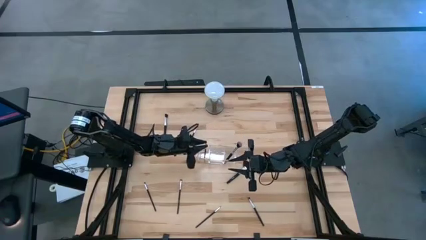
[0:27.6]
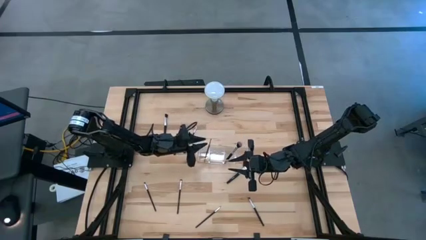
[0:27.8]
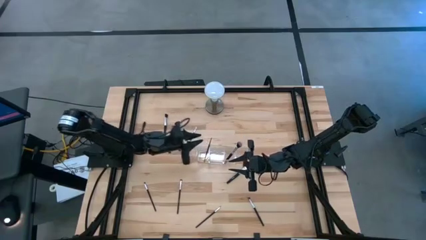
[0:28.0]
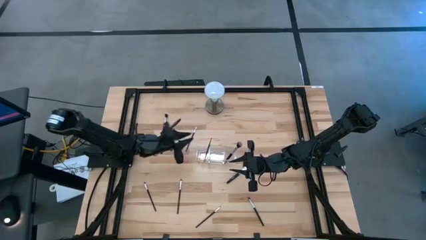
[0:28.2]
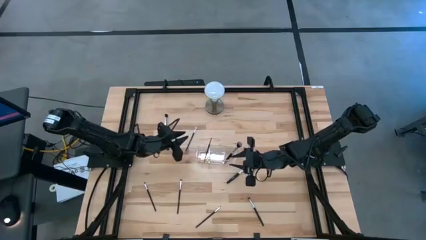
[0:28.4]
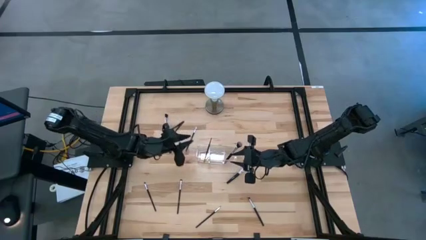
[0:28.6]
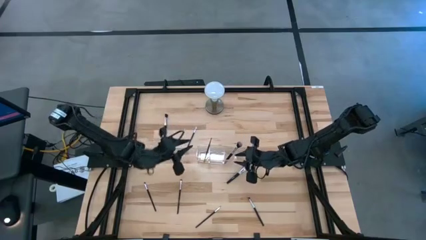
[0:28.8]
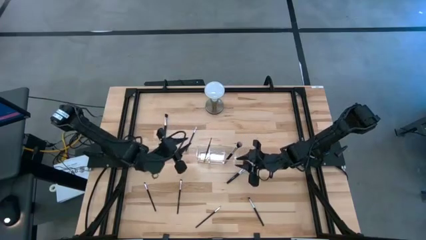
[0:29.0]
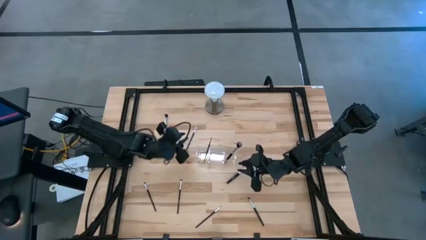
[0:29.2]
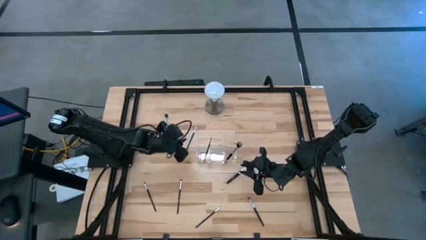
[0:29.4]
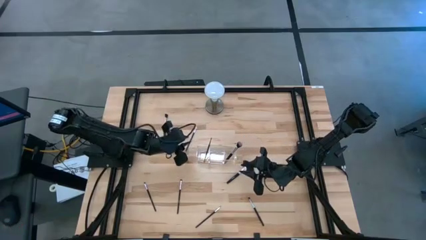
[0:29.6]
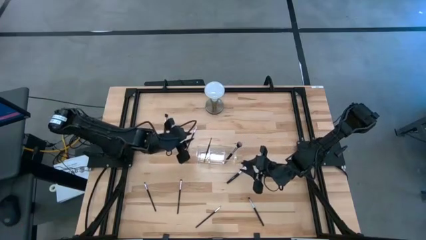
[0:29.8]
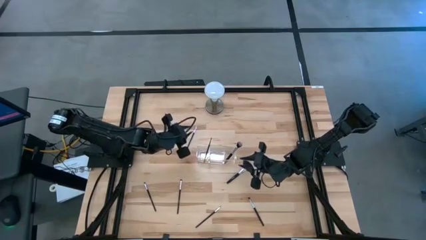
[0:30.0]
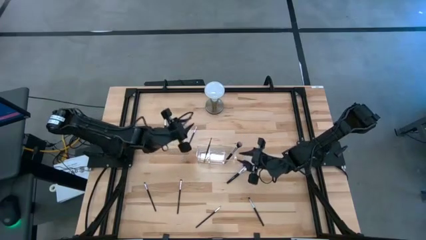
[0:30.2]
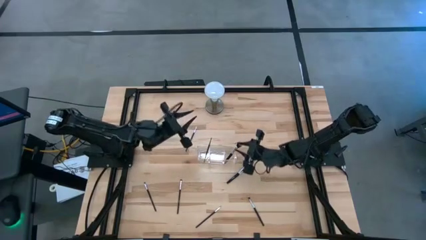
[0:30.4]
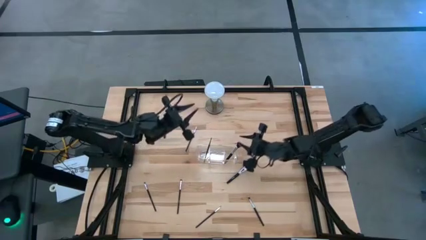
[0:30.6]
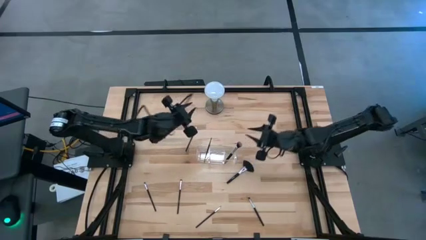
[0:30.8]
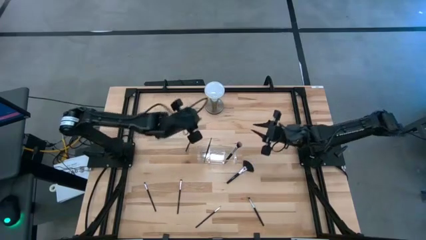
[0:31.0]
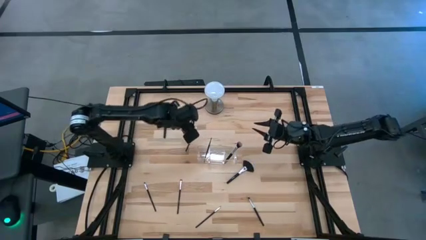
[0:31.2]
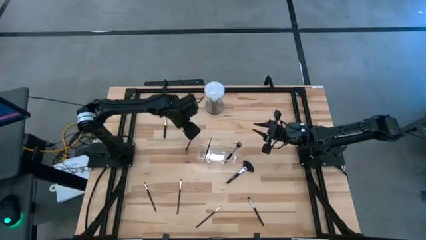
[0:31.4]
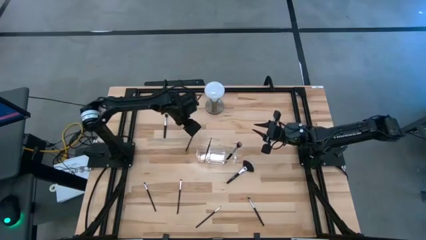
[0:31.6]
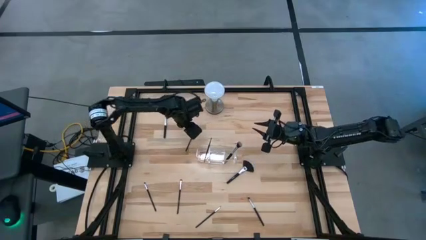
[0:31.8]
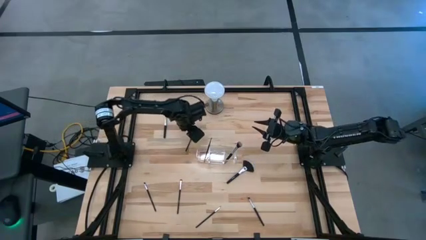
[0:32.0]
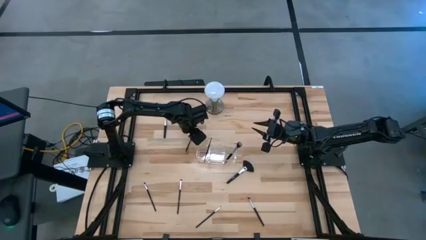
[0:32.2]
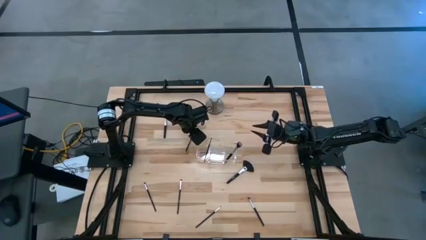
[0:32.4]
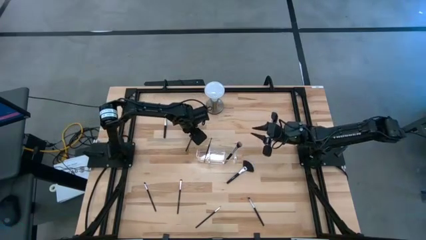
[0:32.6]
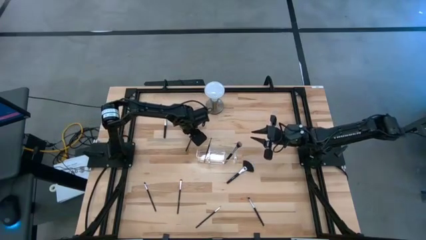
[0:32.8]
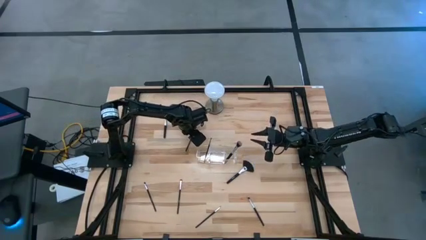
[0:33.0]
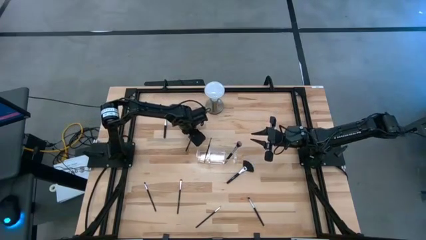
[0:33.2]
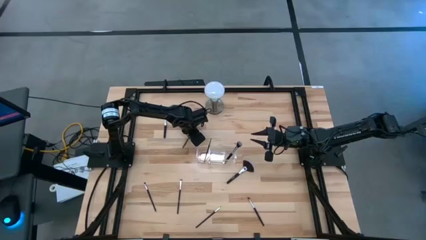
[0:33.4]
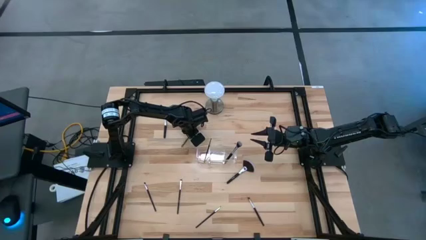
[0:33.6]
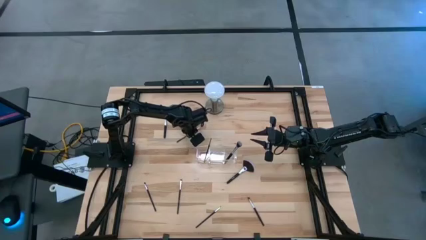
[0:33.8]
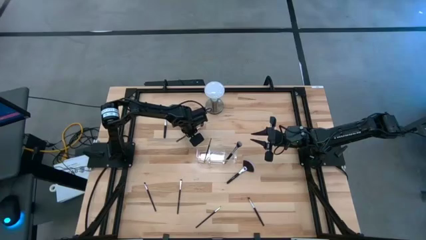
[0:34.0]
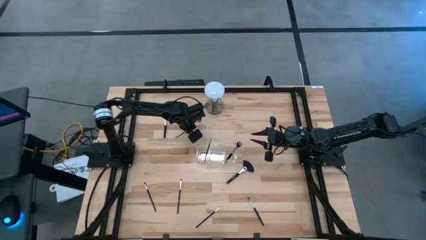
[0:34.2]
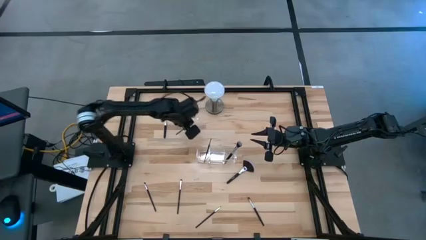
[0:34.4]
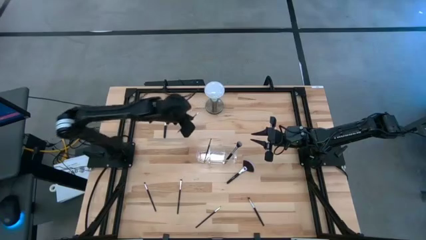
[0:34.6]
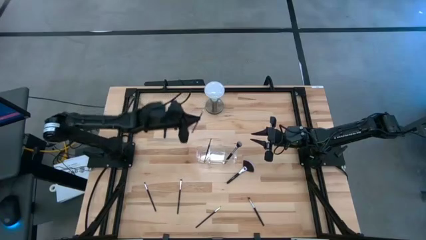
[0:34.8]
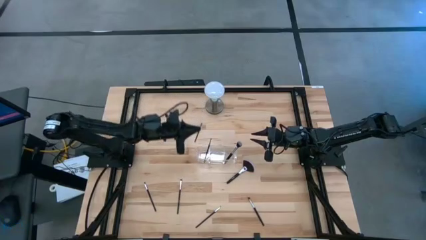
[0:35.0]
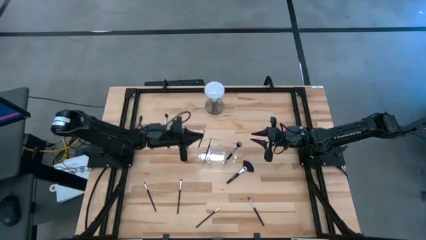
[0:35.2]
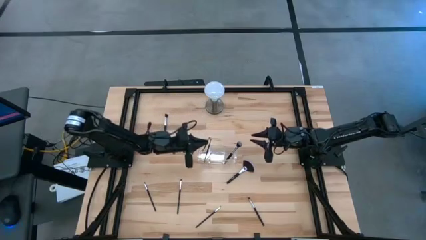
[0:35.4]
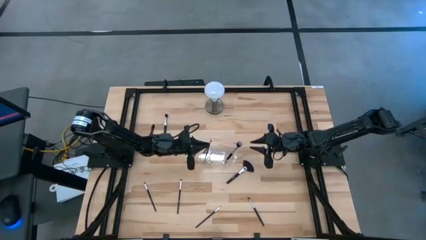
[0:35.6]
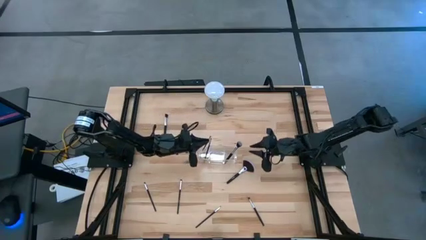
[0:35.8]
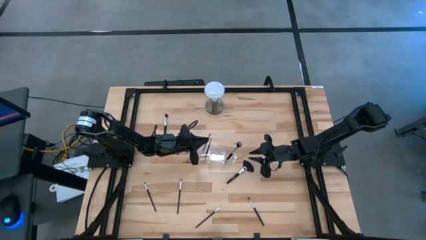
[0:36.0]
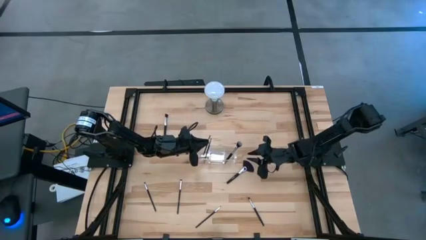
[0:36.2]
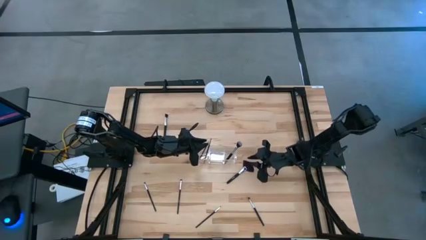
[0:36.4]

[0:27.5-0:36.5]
Task: Put items in baskets/containers
Put the black eyeshadow brush into the transparent organizer

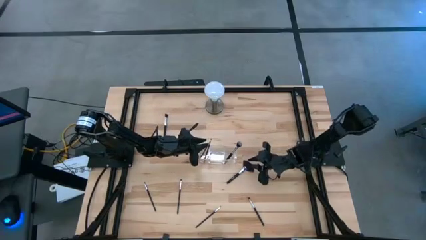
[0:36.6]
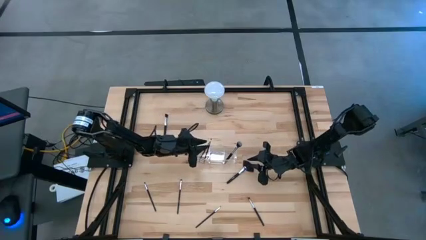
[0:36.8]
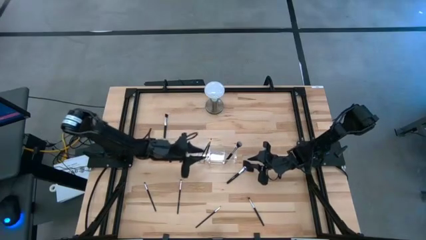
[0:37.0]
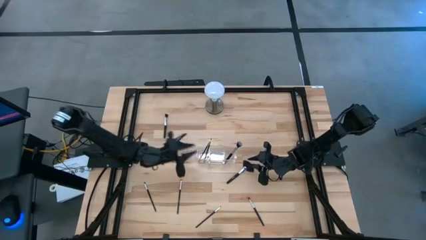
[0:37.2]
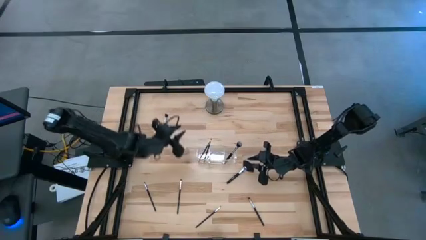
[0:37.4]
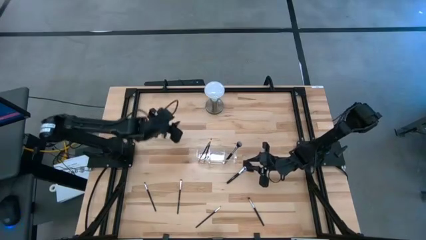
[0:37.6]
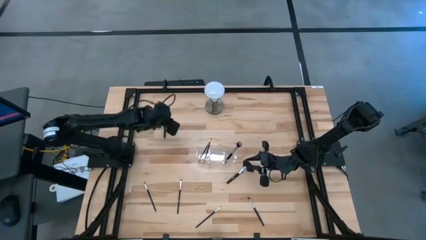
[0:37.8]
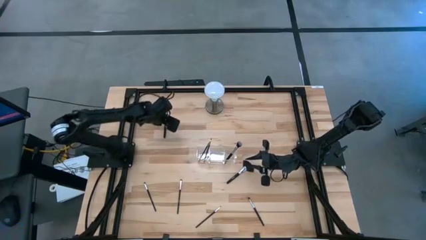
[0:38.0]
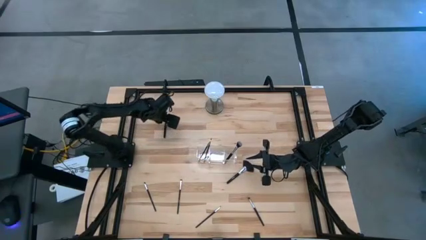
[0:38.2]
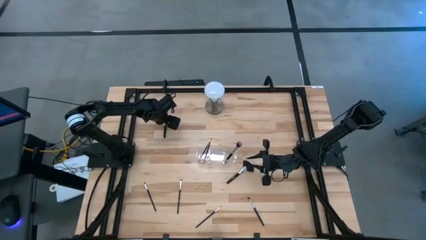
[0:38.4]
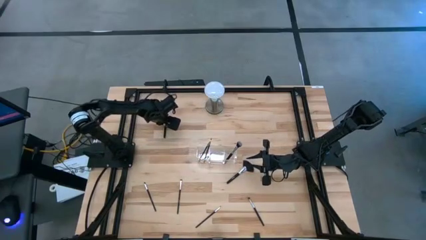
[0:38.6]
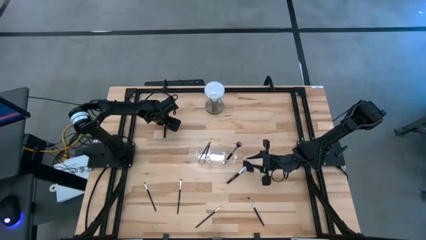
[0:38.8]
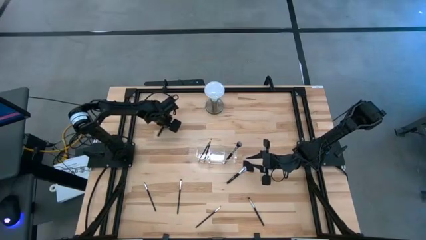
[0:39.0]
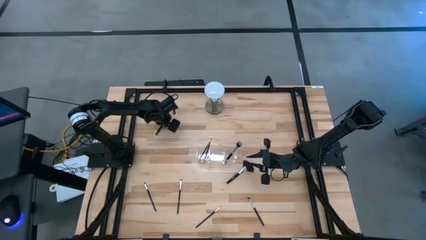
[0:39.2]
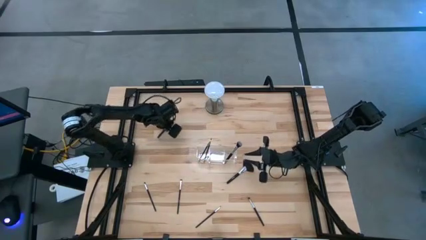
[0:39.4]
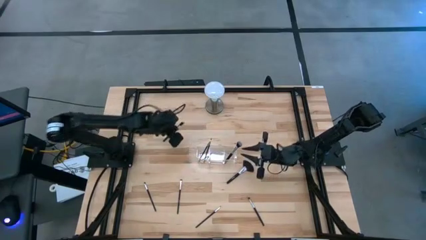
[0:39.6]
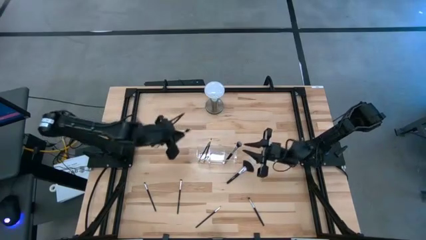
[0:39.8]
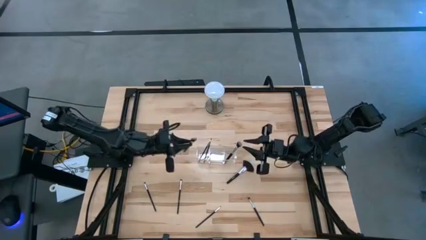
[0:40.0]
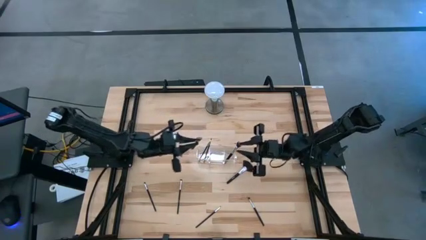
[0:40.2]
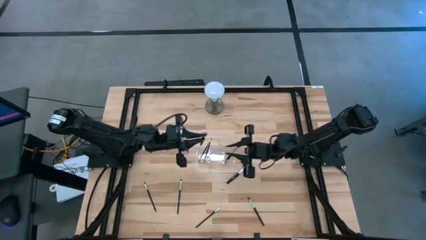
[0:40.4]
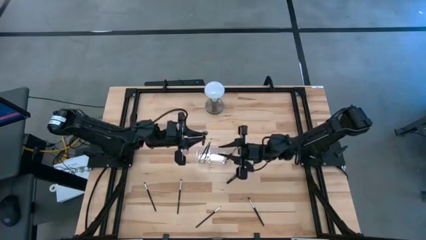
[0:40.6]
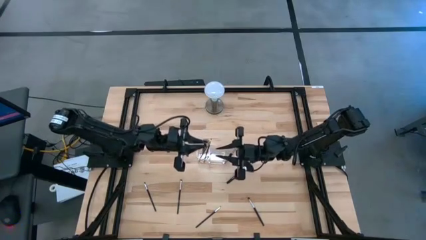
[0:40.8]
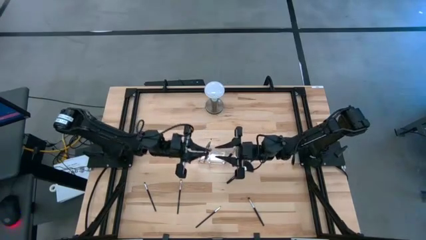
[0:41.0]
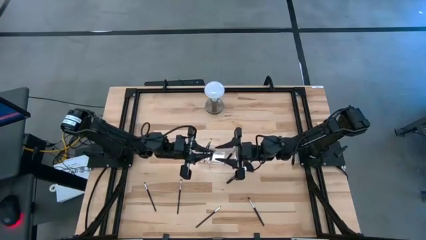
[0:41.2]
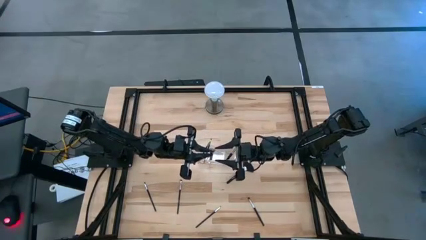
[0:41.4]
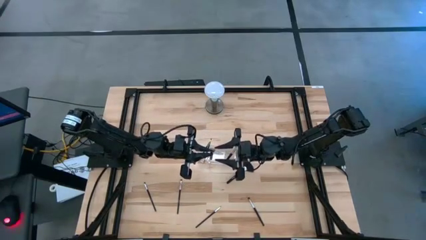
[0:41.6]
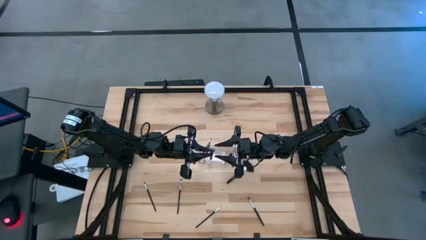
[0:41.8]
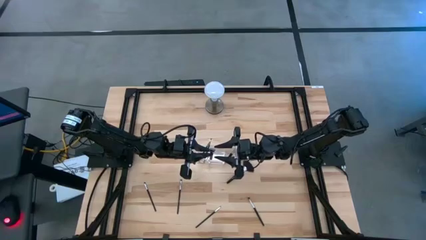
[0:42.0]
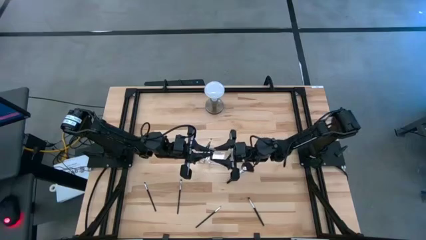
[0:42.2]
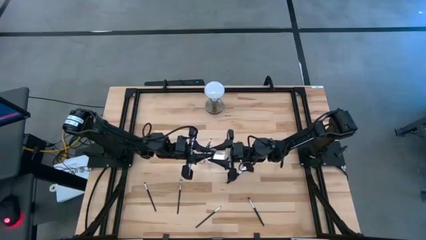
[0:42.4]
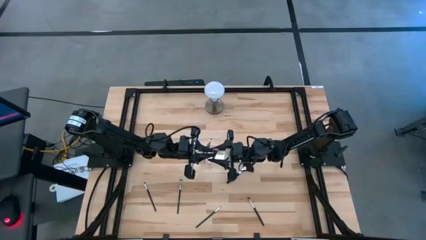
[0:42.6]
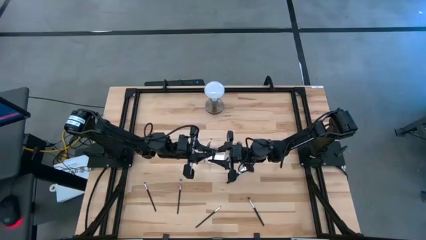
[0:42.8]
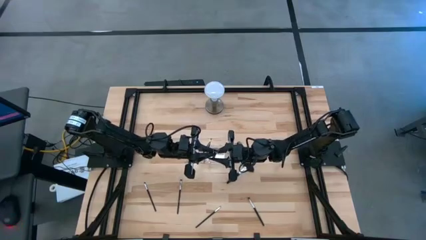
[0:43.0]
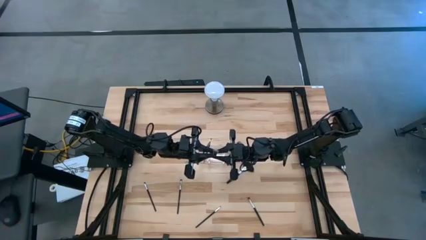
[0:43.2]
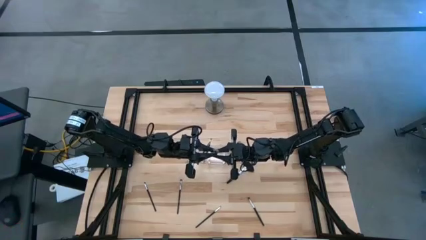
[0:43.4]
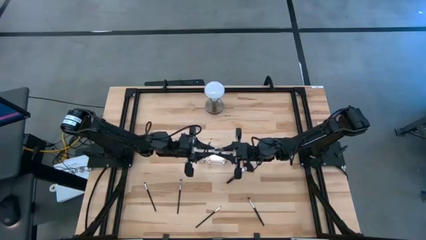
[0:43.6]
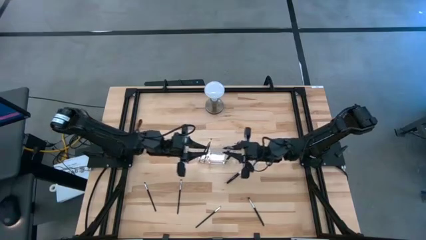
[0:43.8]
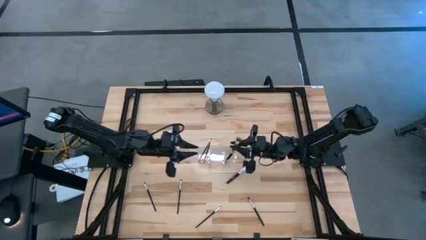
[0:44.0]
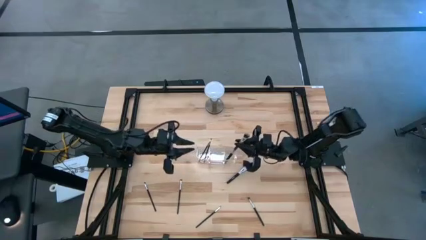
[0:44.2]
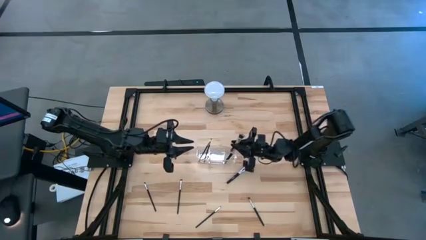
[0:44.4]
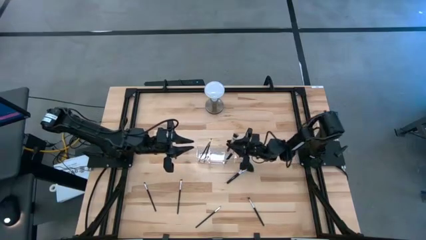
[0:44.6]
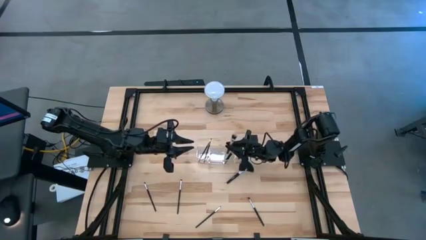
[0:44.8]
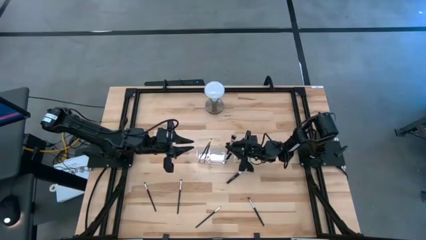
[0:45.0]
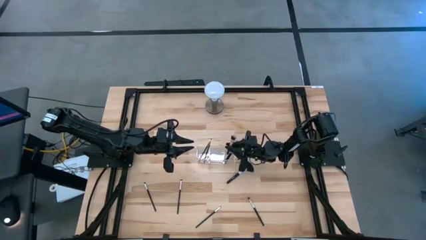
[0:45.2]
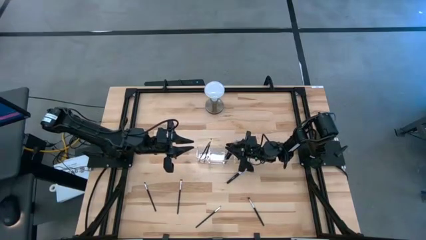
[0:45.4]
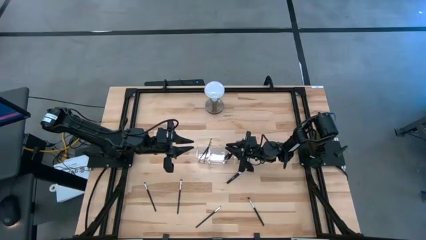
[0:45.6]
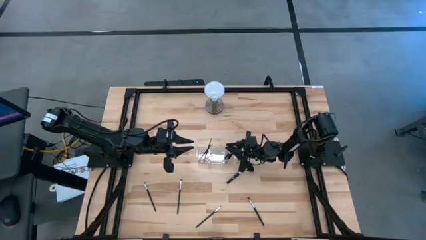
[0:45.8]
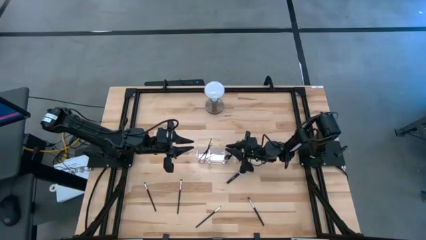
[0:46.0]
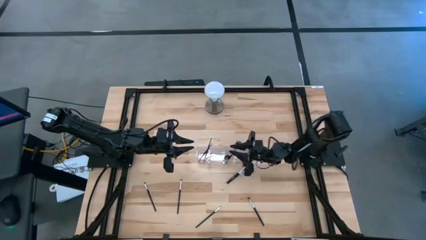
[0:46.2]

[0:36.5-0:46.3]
Put the black foundation brush into the transparent organizer
